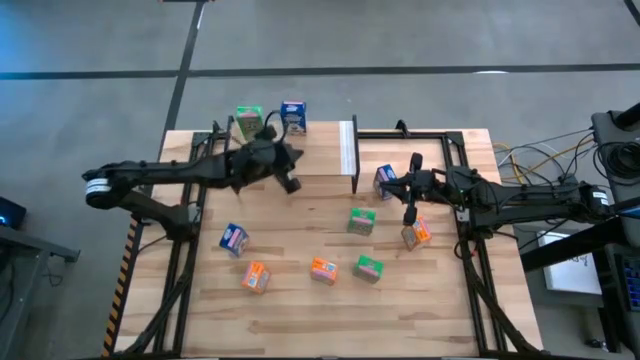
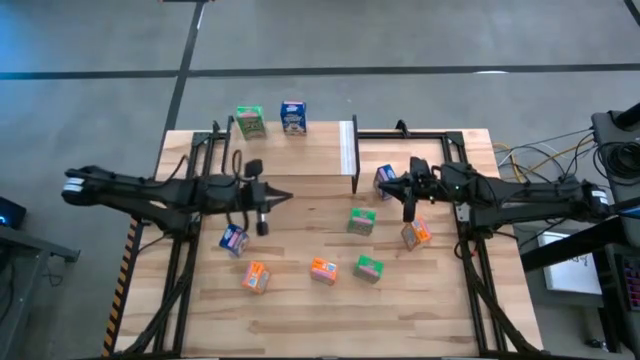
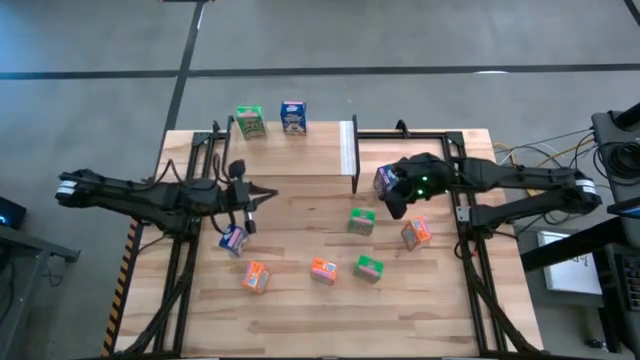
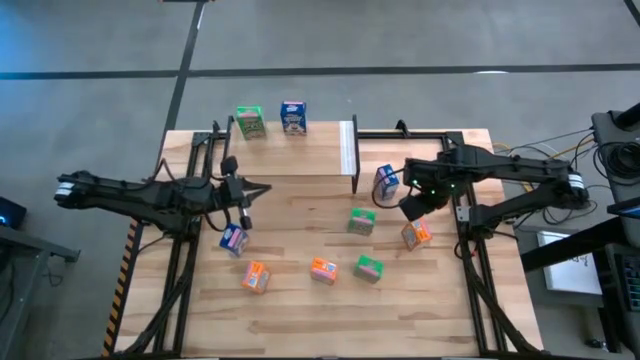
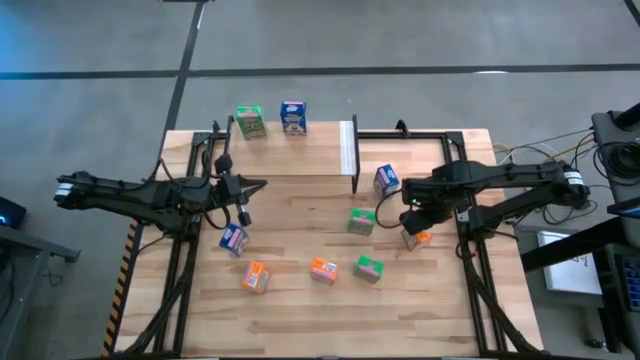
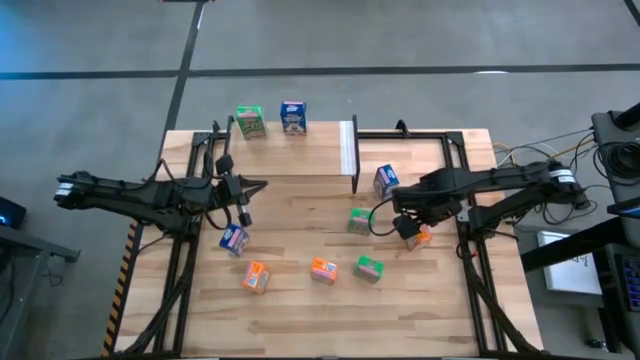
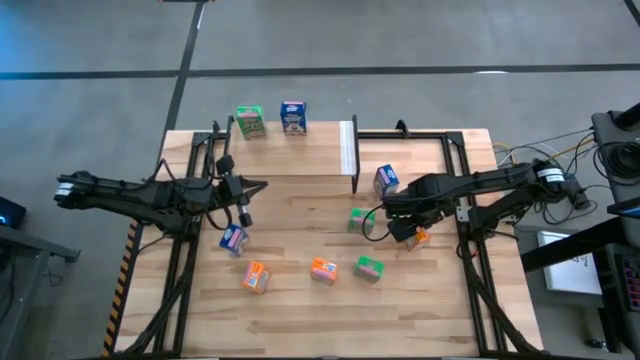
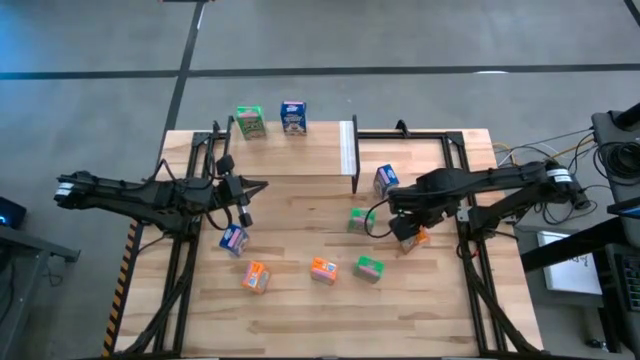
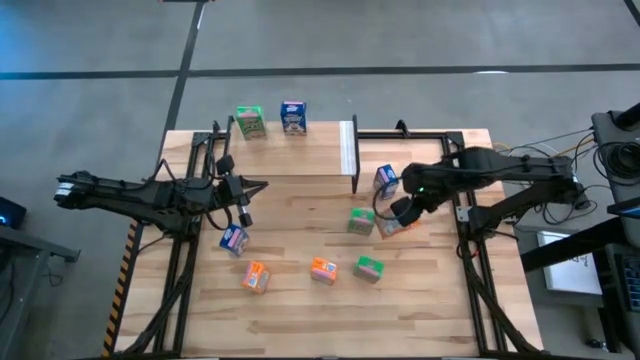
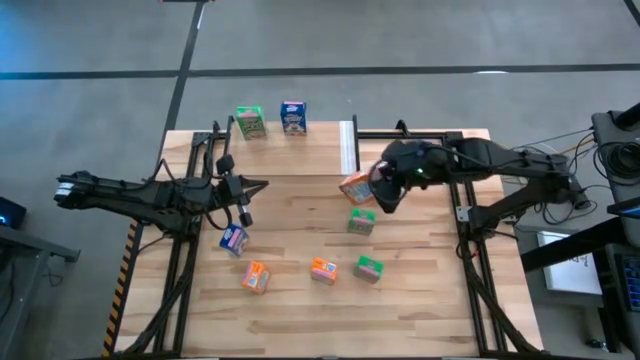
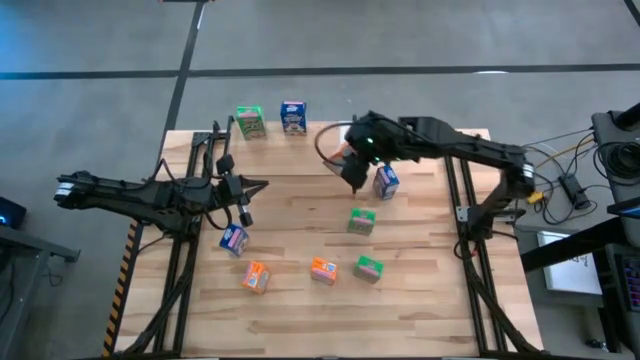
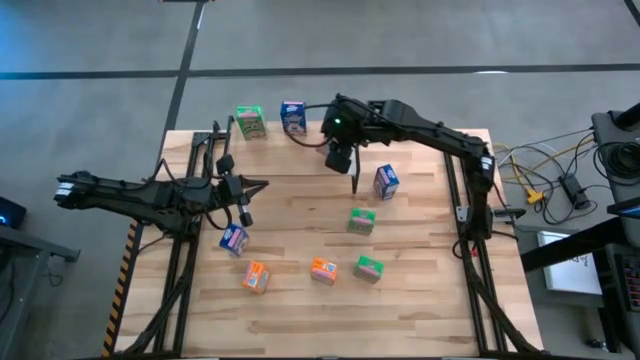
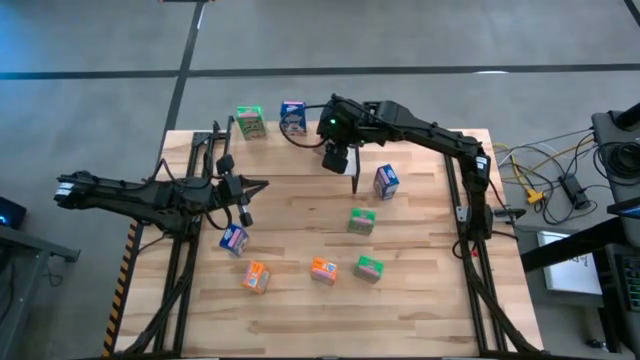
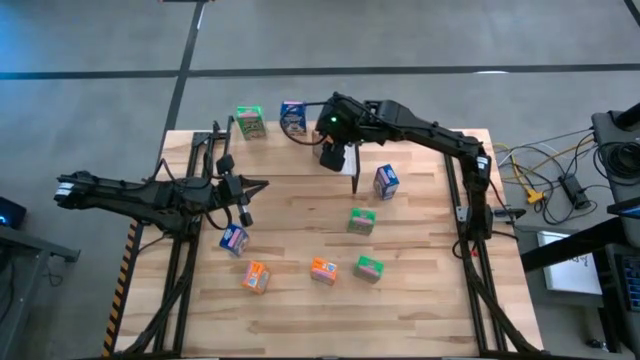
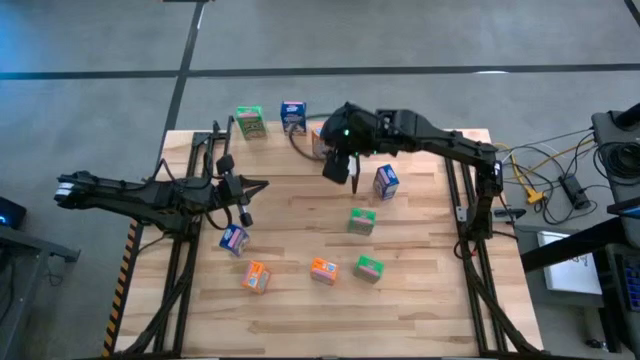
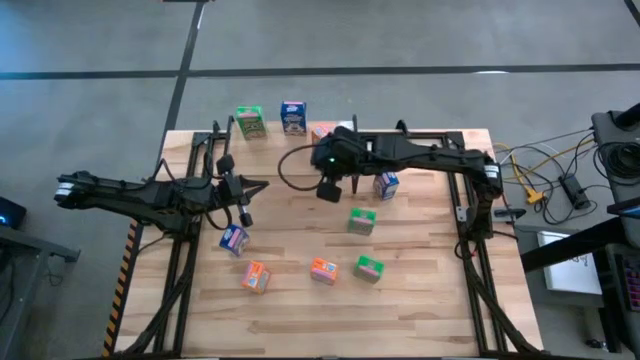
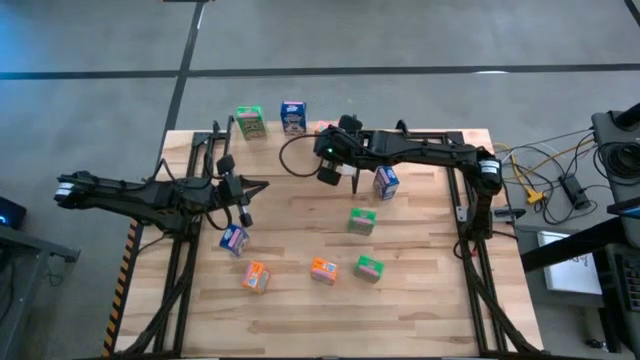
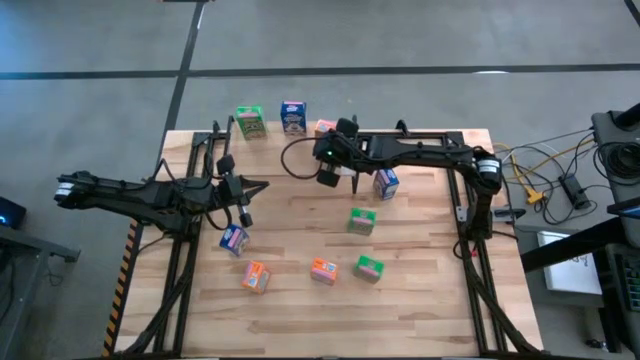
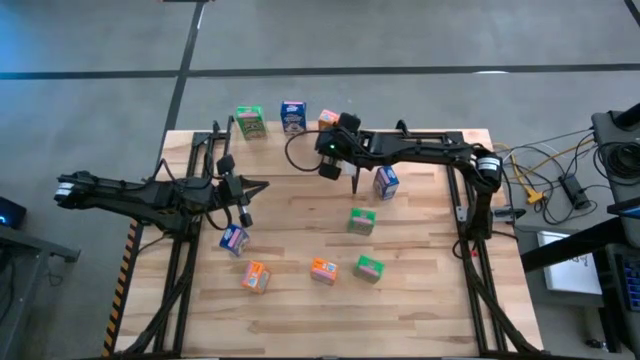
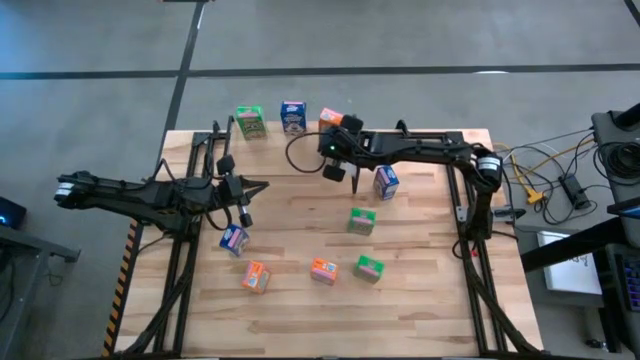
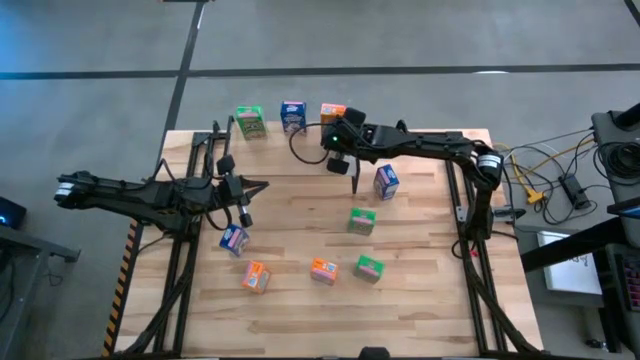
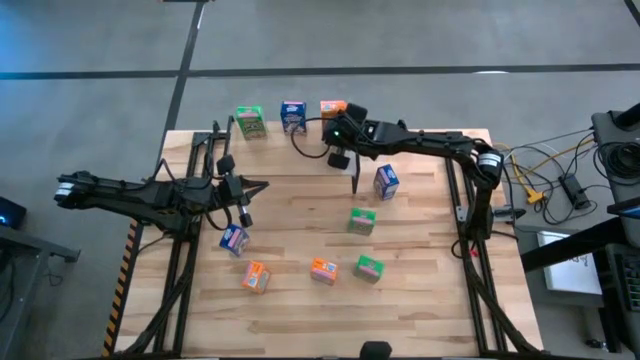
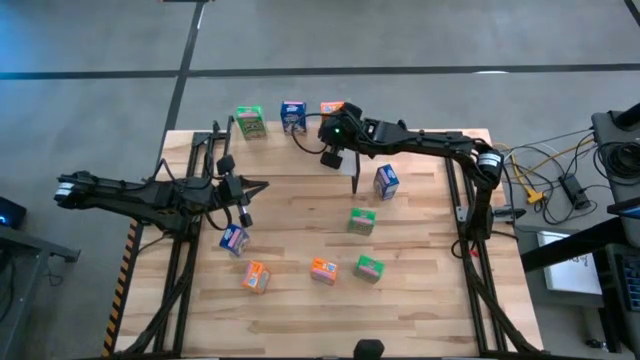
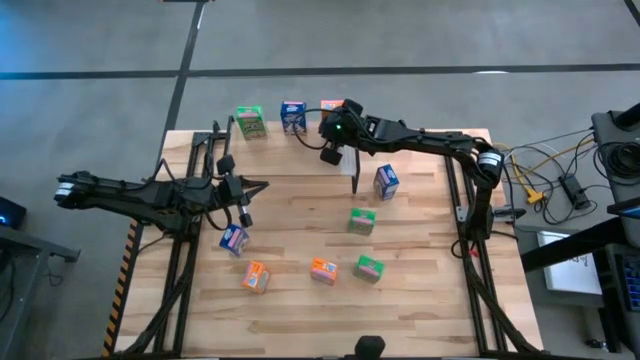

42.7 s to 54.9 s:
Task: Stack cereal on shelf
Put the right orange cereal box on the shelf

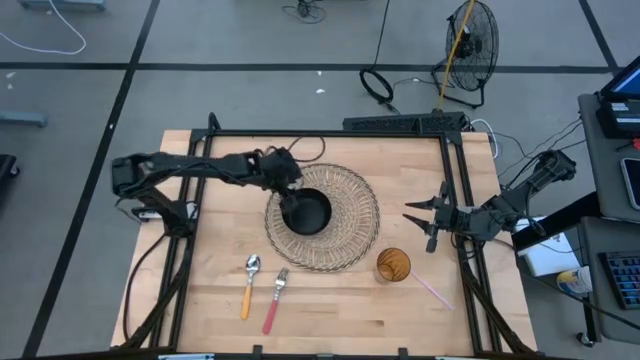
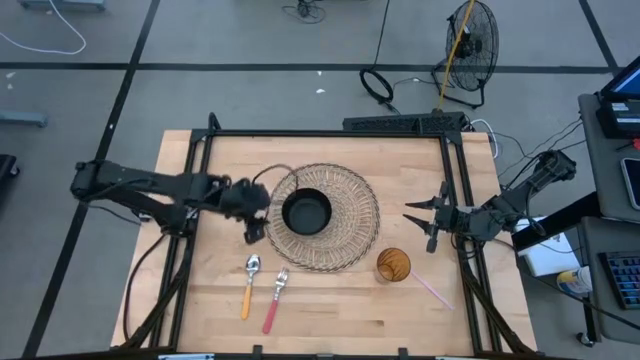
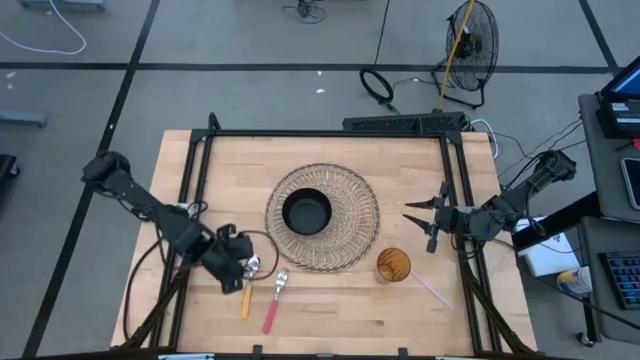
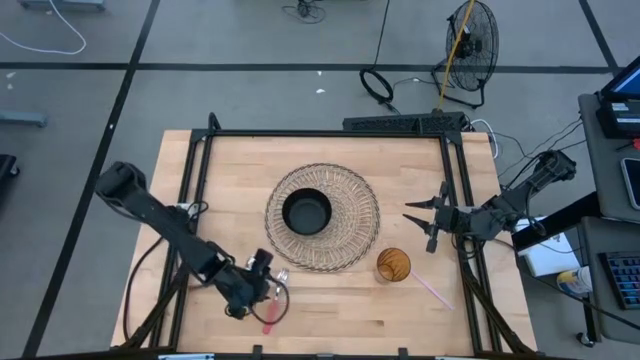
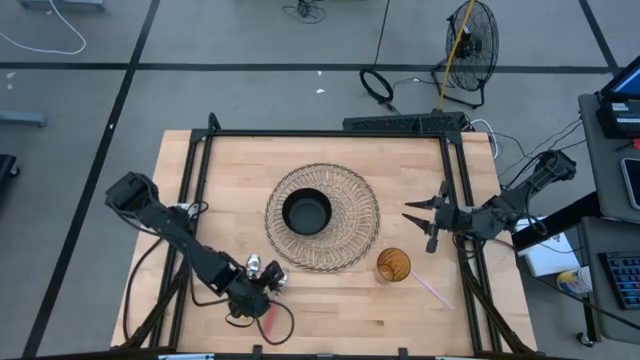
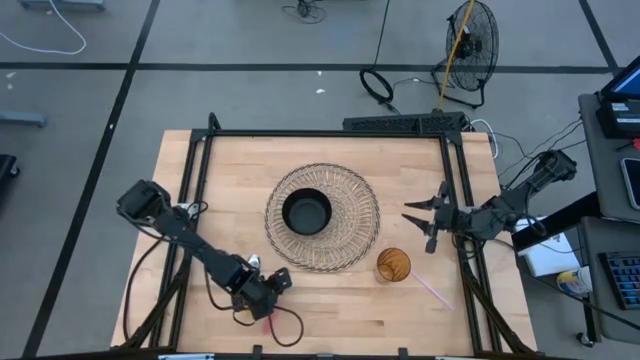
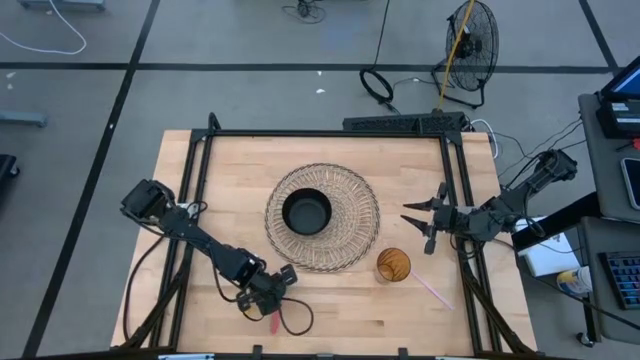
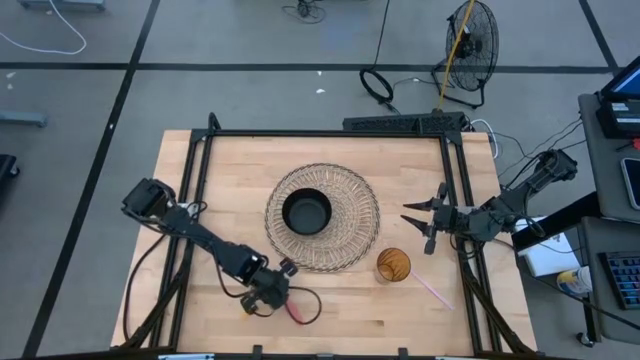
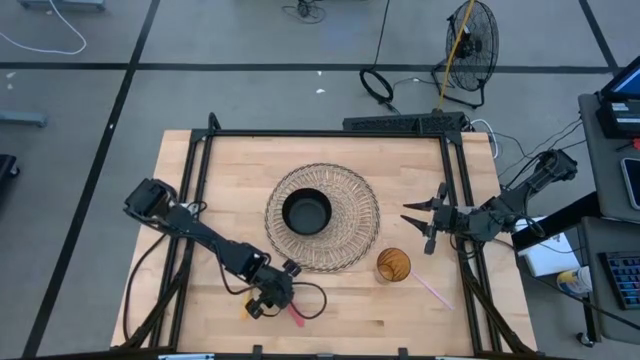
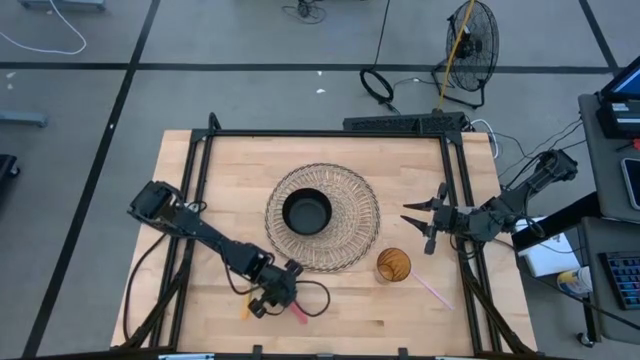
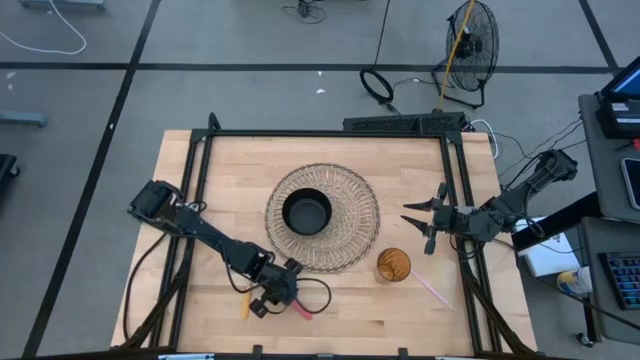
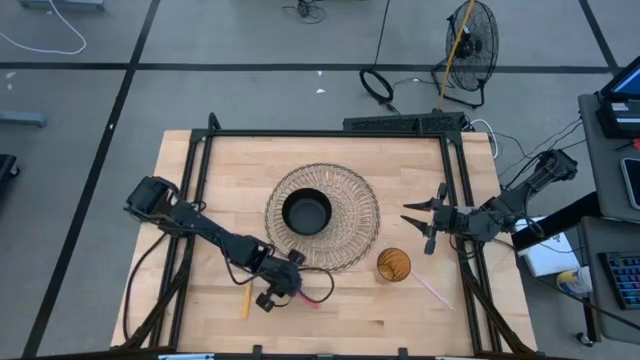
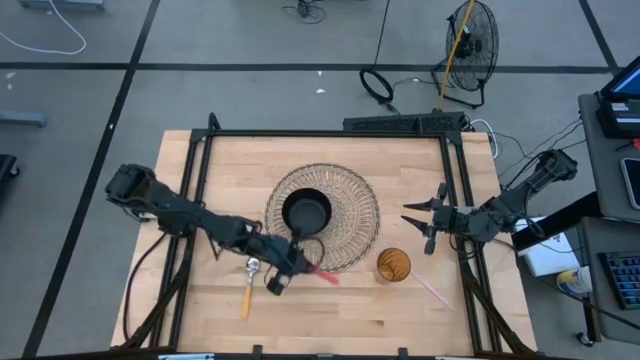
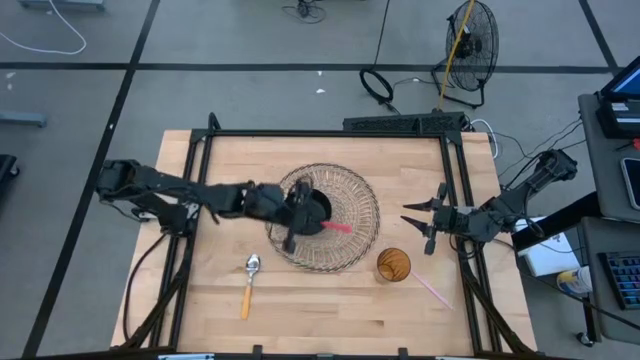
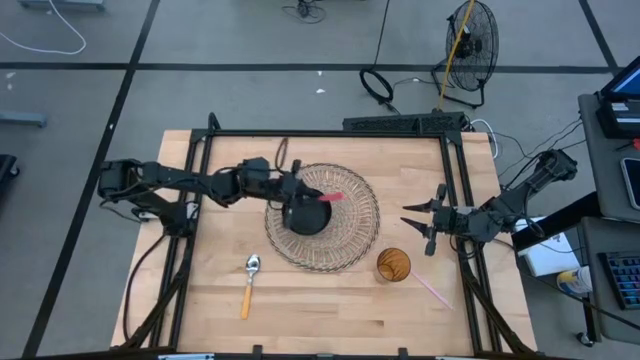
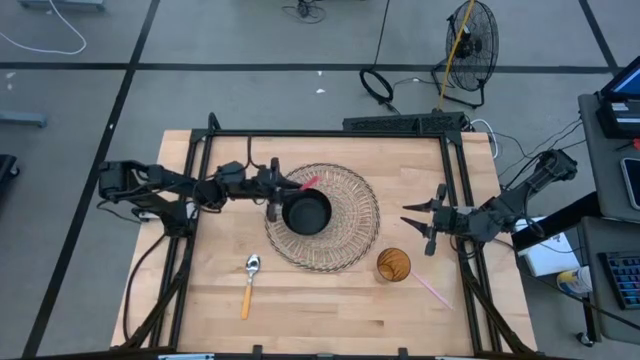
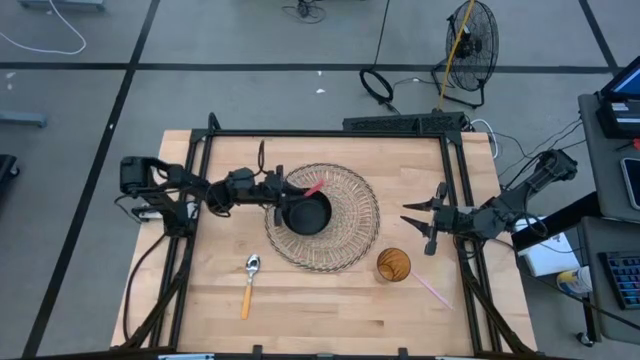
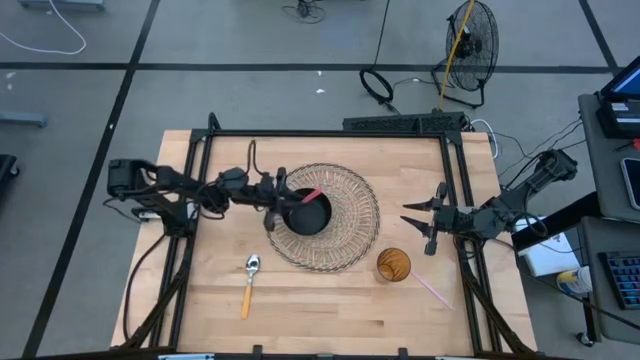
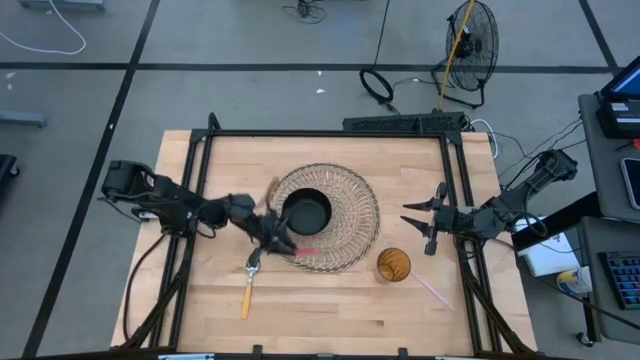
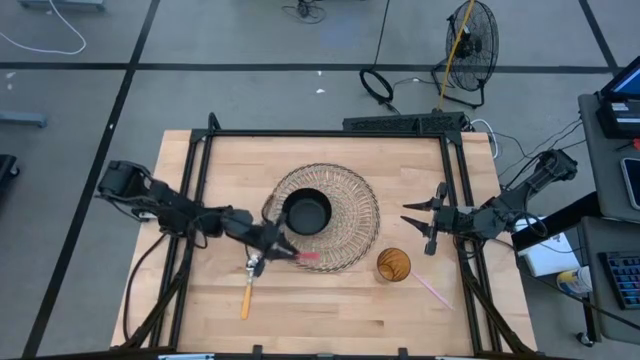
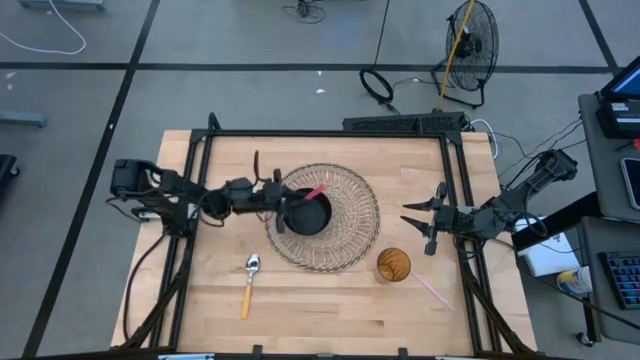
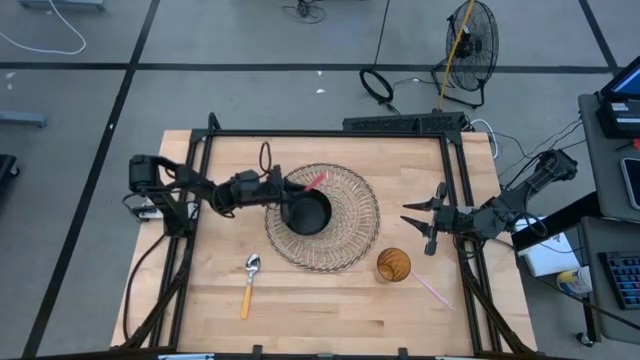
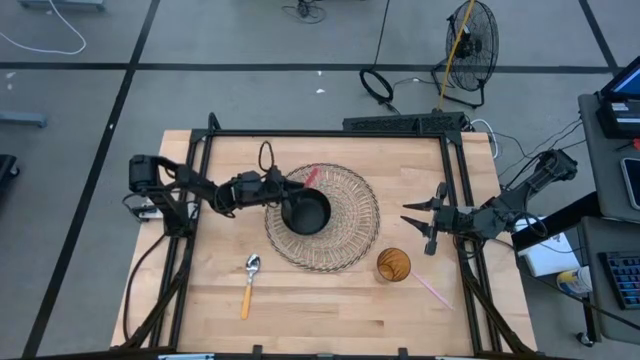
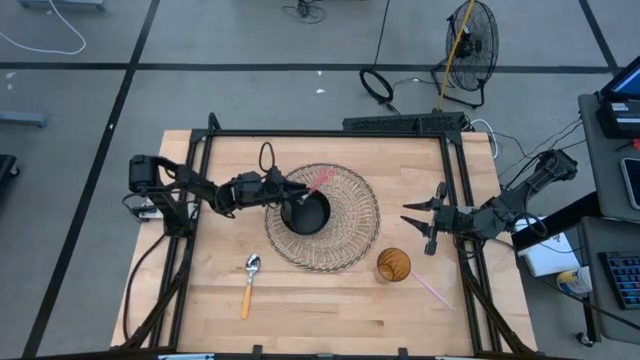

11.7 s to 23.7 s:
Task: Pick & Place Utensil
Put the pink fork into the black bowl
